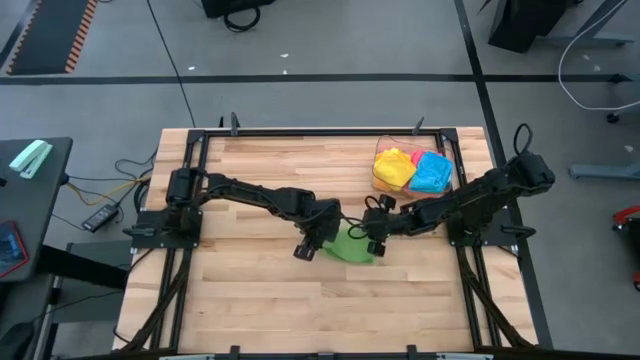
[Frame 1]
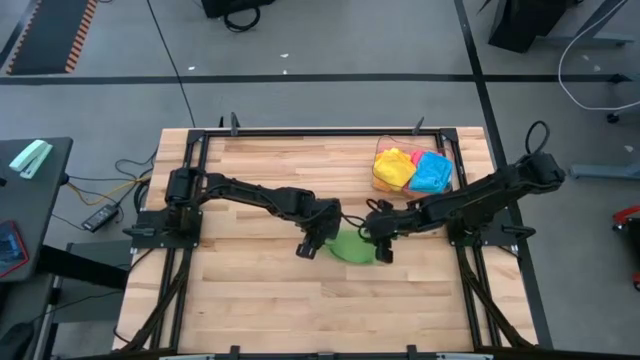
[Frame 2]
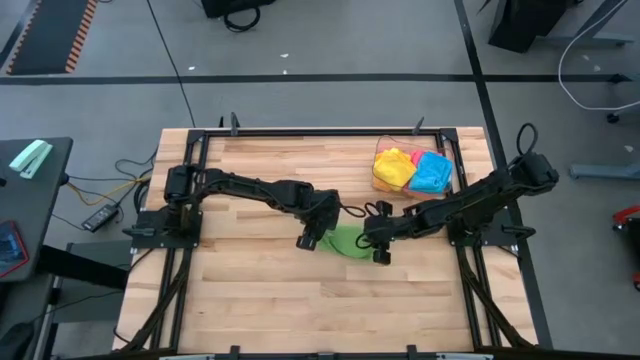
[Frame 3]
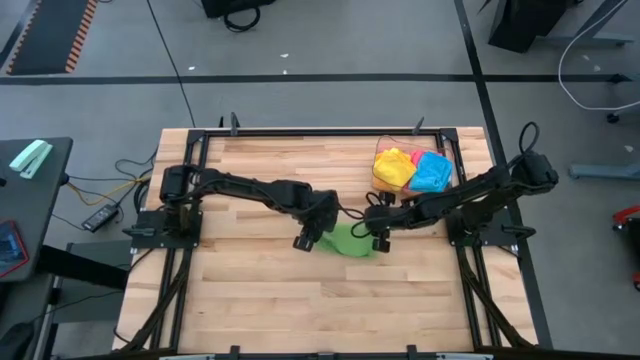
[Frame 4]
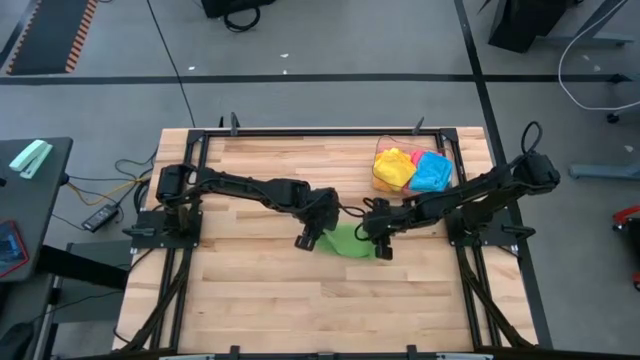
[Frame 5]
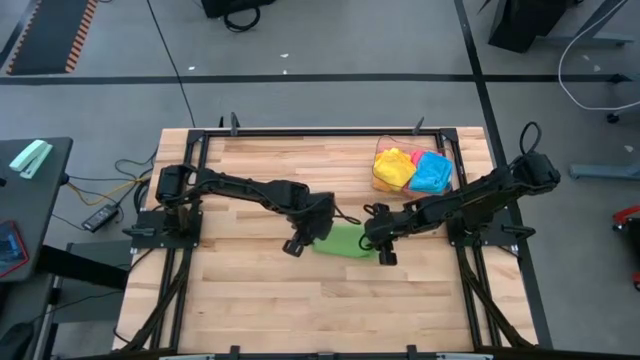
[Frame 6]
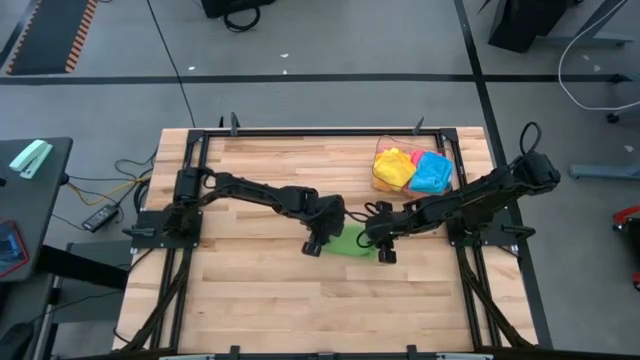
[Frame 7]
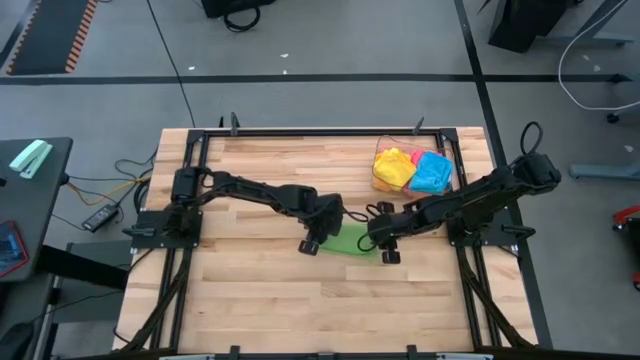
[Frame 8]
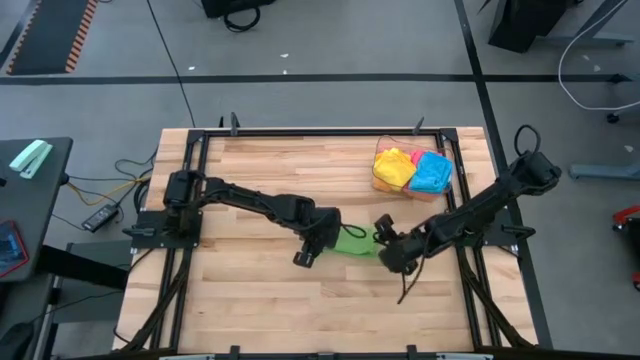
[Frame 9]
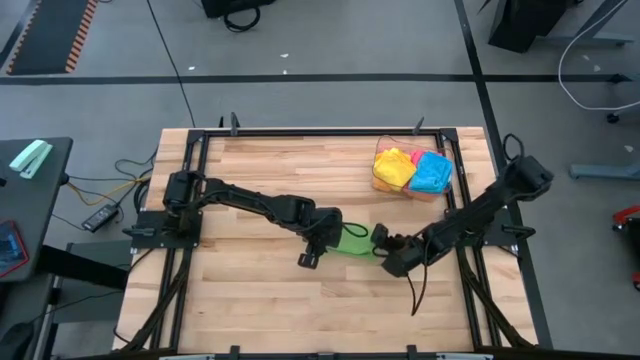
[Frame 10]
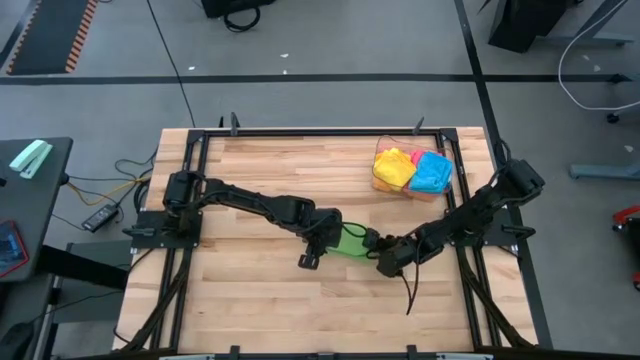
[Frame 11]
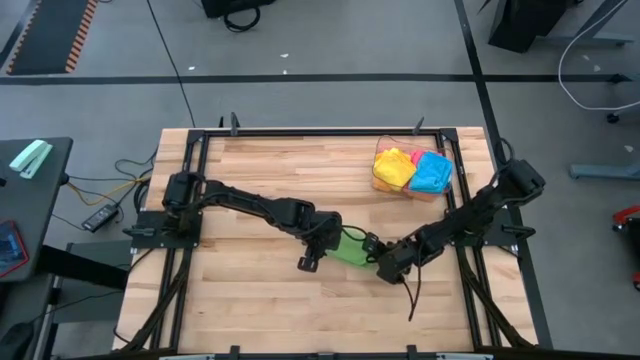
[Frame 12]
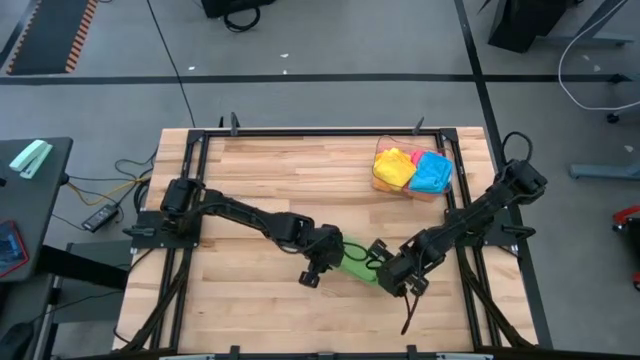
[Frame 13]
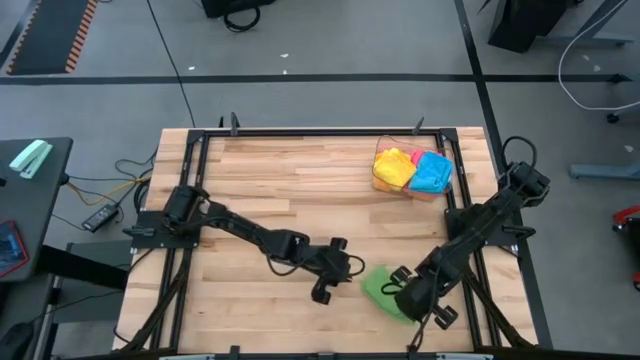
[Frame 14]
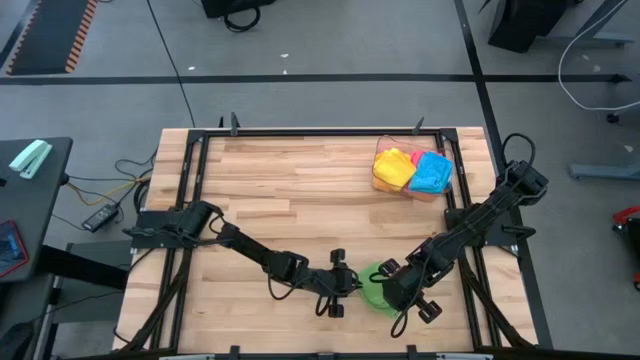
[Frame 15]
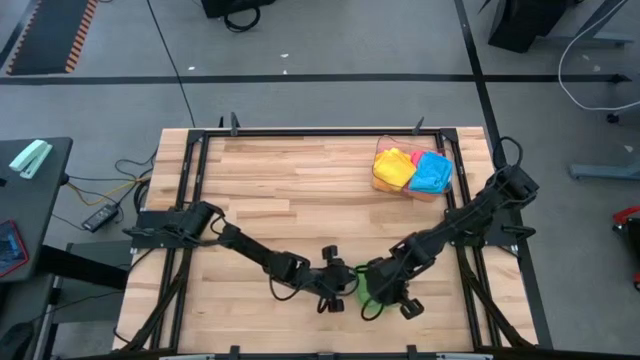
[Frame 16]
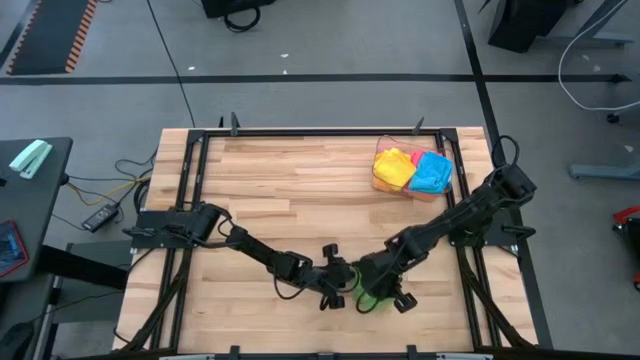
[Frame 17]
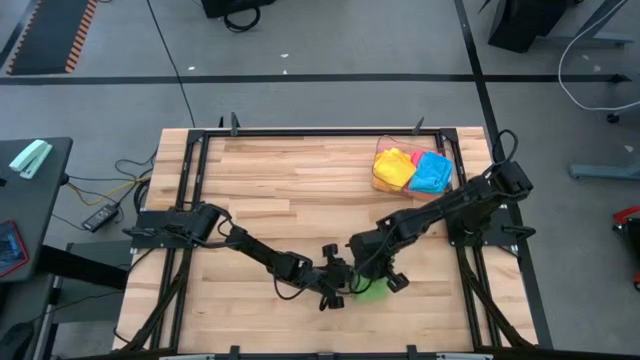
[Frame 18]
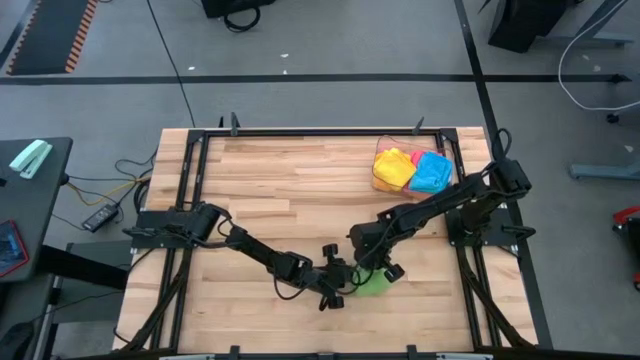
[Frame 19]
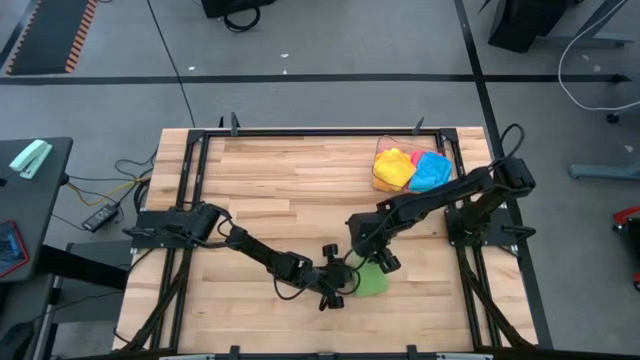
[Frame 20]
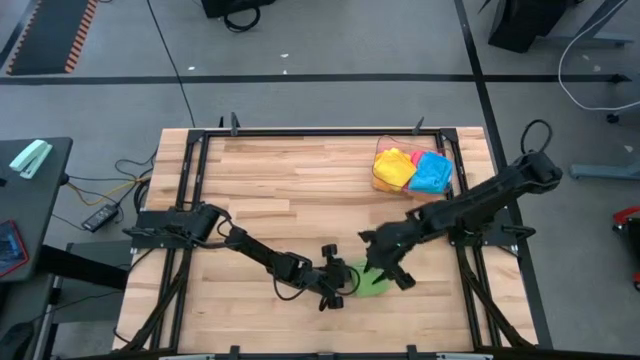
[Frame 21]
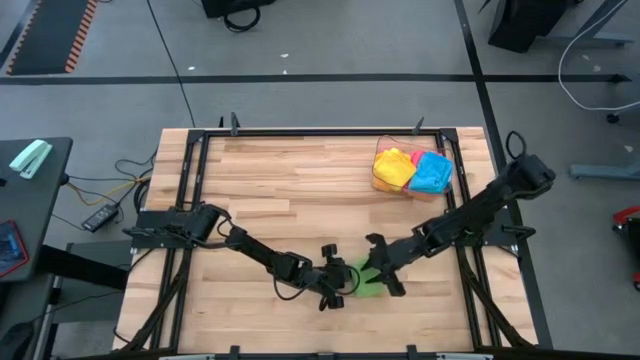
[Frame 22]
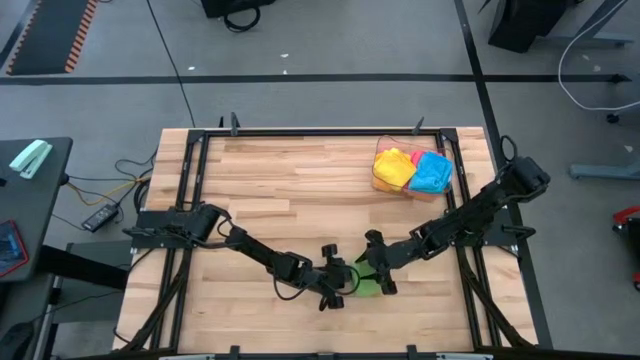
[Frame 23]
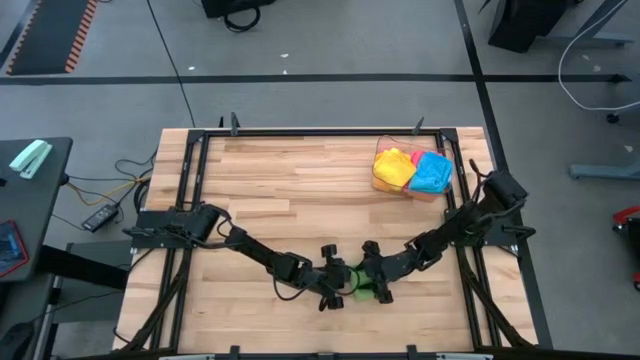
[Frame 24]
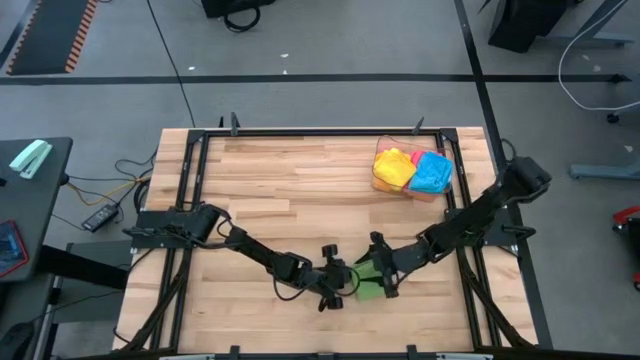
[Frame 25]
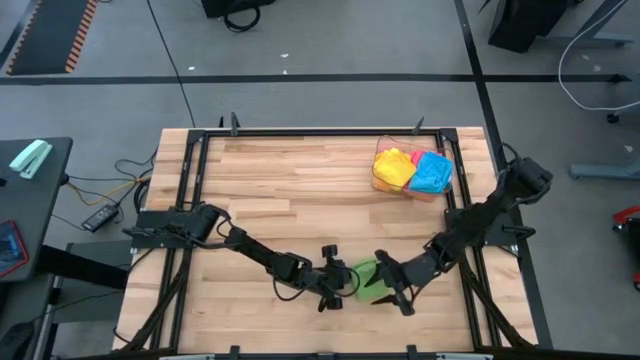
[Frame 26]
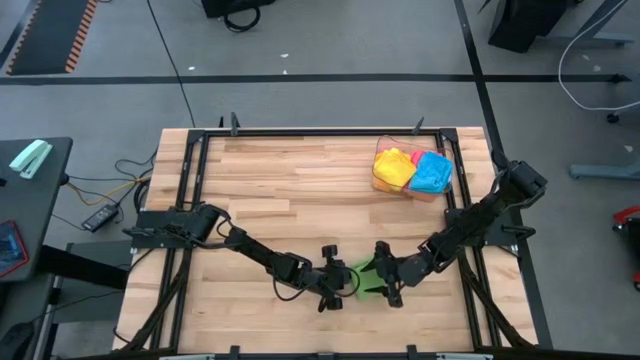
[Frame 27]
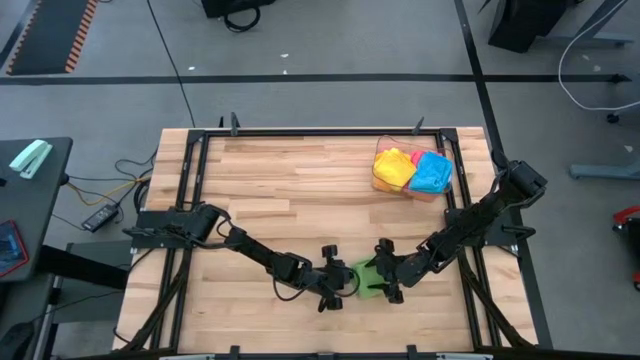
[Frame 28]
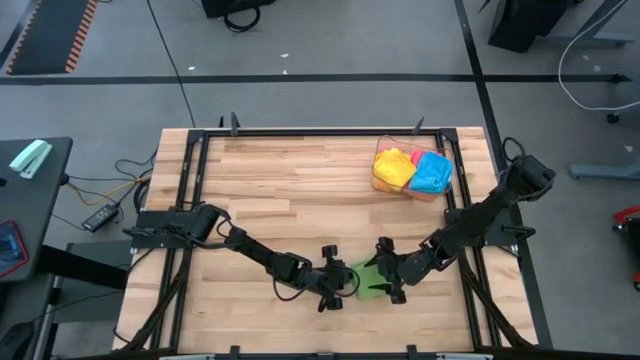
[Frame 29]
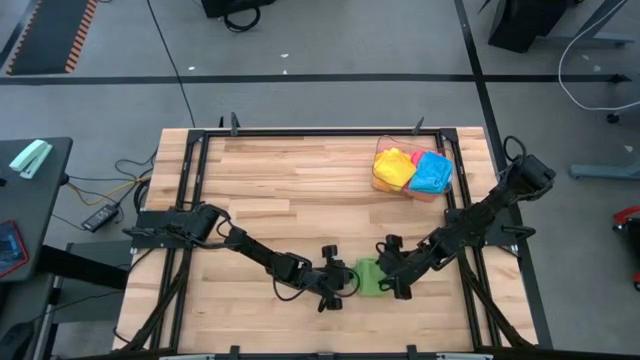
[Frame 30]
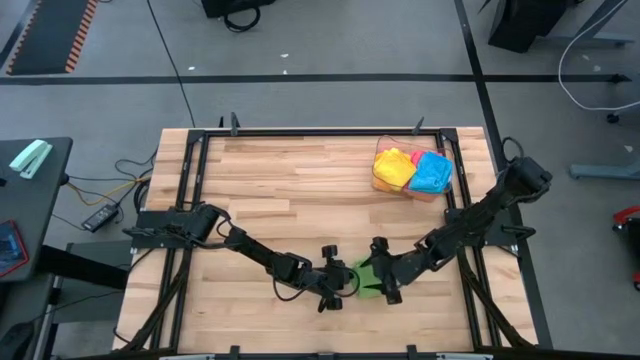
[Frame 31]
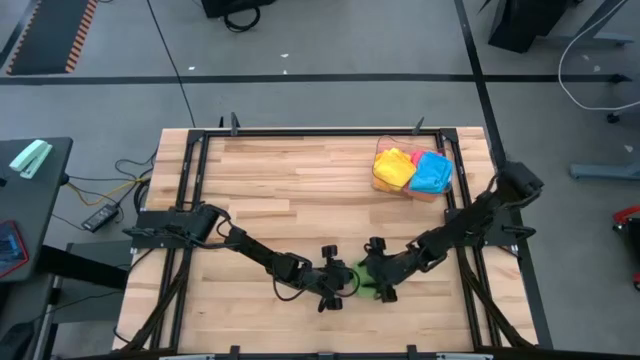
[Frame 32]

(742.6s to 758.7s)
Task: Fold microfiber towels
Fold the green microfiber cloth

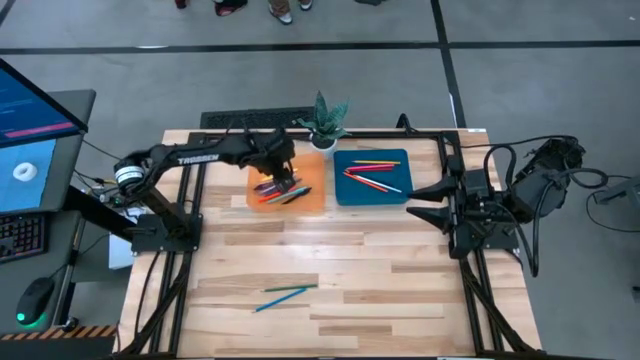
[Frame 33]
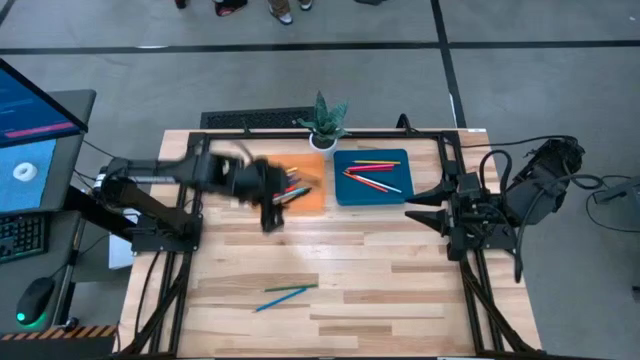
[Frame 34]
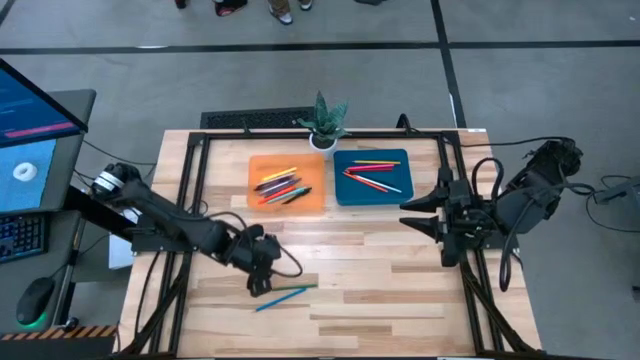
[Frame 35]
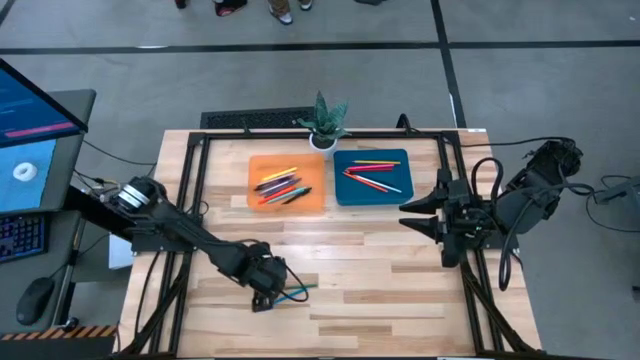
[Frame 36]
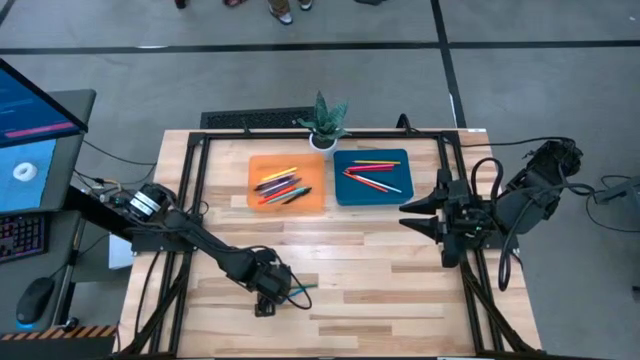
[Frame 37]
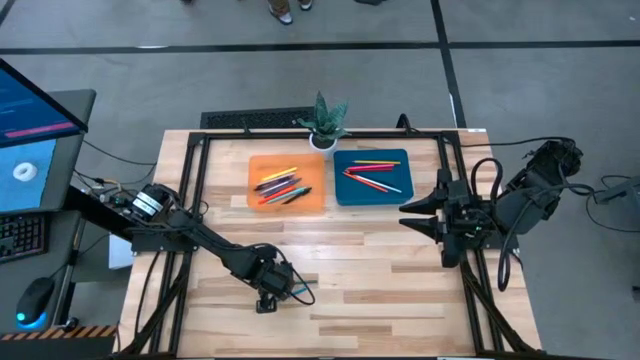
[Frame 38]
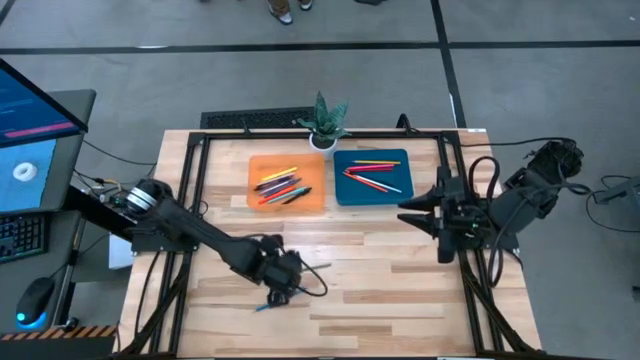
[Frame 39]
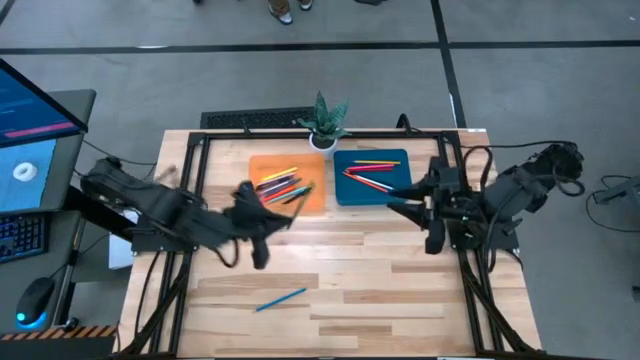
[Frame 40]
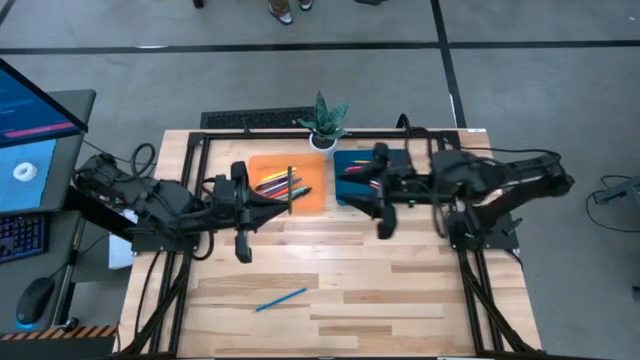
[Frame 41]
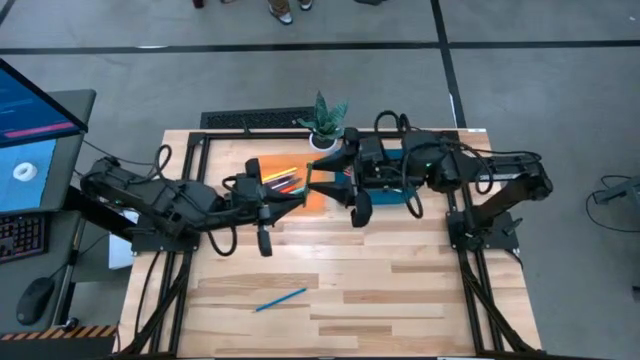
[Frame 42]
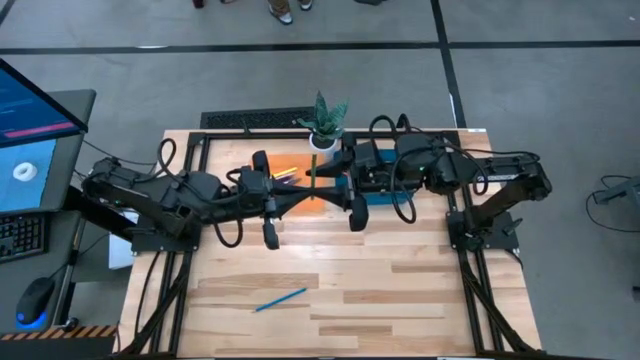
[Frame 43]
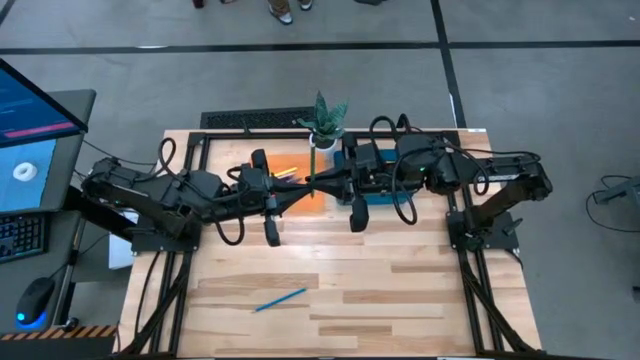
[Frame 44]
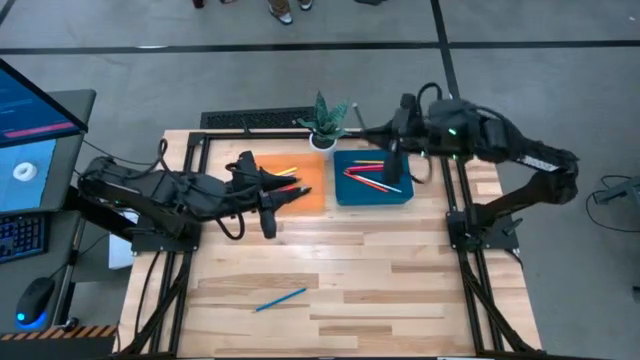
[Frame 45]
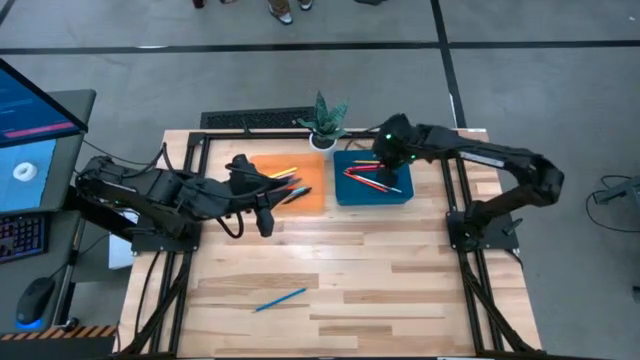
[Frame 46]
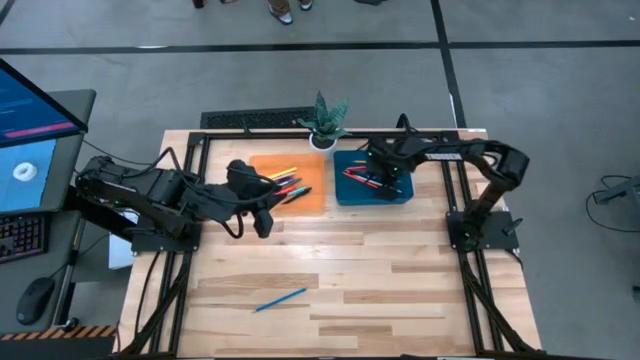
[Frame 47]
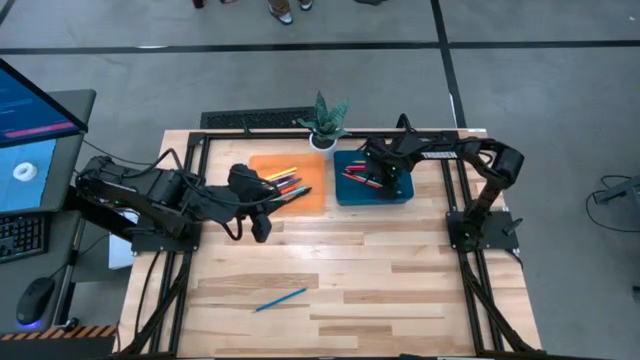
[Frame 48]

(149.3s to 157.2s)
Task: Sort pens & pencils
Put the green pencil into the blue bin
